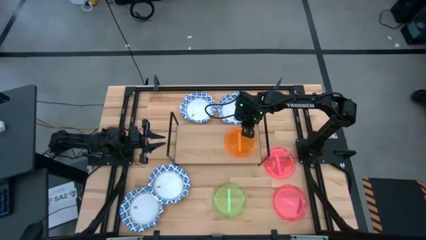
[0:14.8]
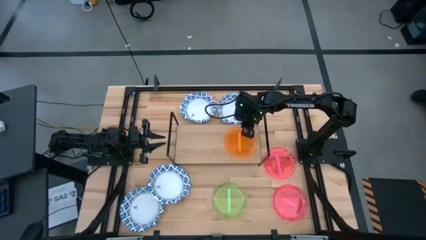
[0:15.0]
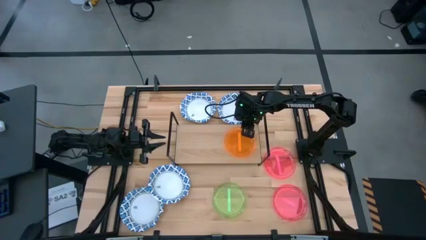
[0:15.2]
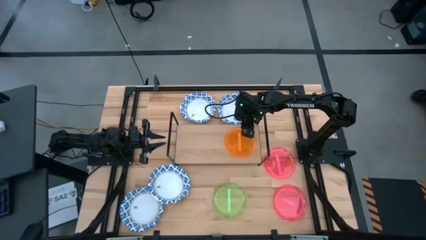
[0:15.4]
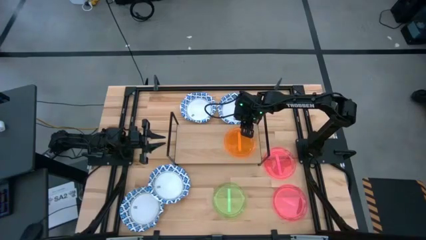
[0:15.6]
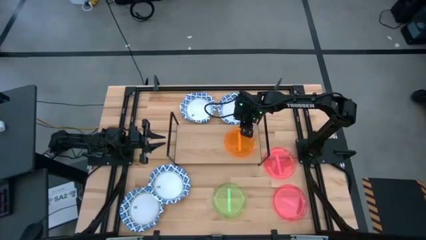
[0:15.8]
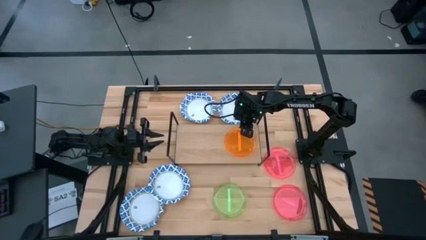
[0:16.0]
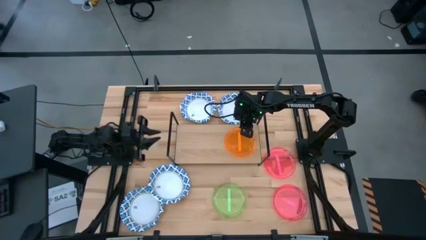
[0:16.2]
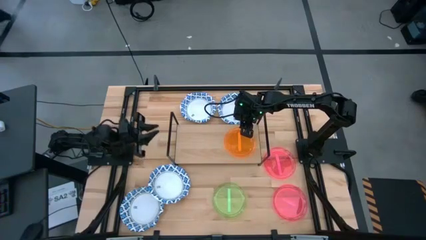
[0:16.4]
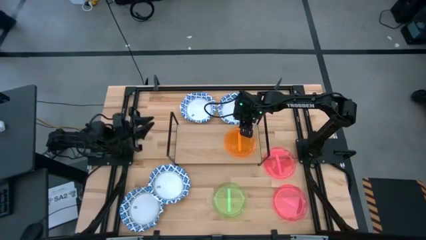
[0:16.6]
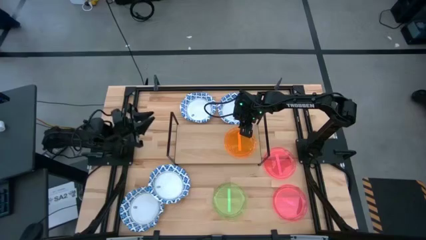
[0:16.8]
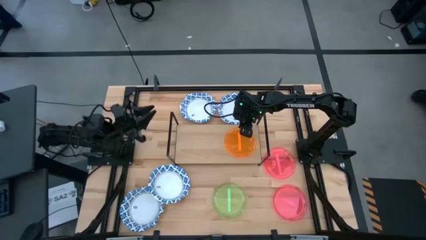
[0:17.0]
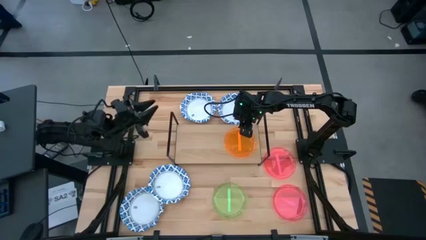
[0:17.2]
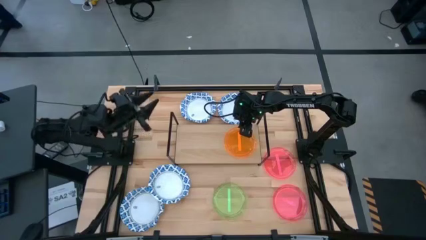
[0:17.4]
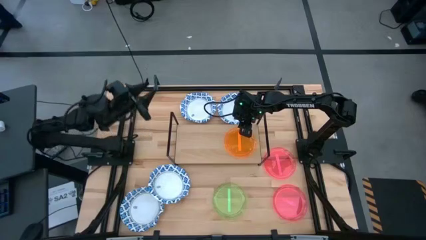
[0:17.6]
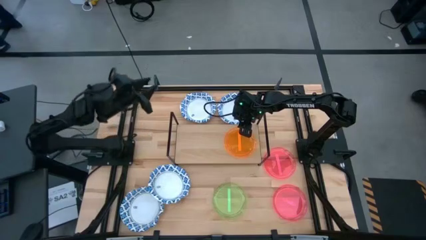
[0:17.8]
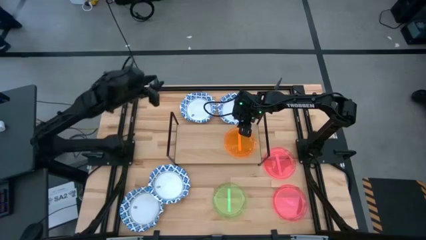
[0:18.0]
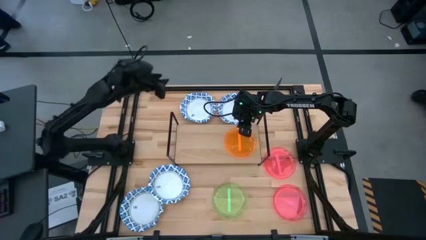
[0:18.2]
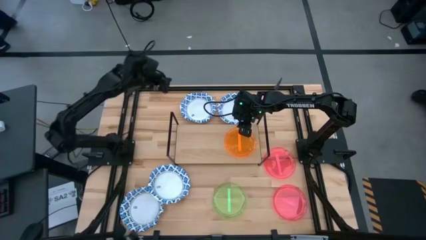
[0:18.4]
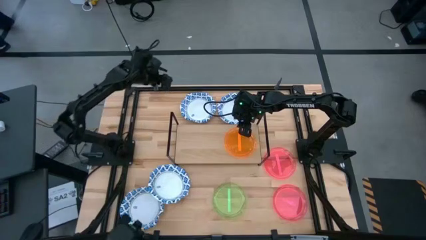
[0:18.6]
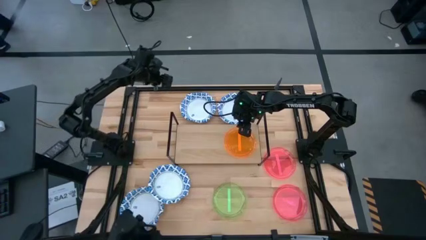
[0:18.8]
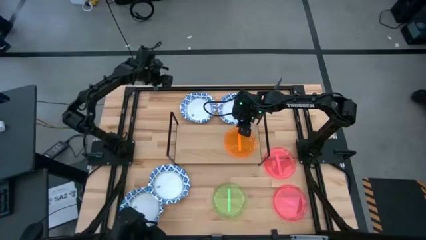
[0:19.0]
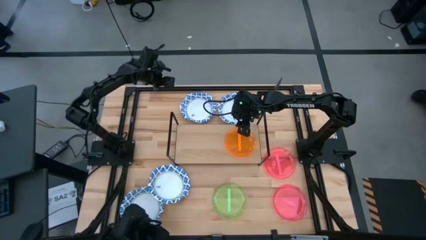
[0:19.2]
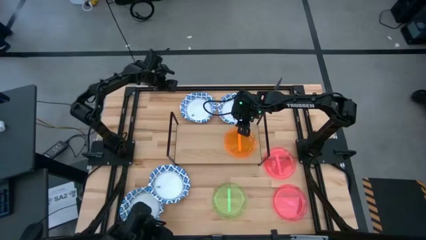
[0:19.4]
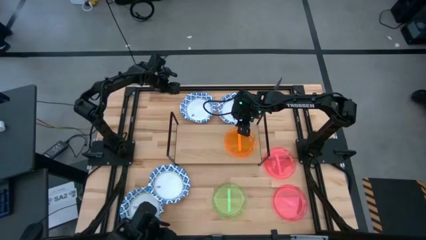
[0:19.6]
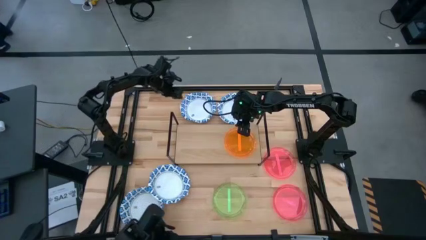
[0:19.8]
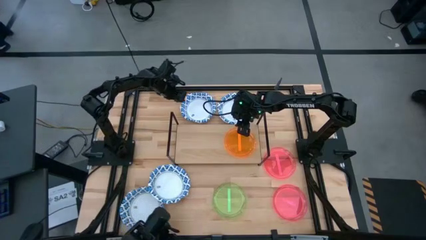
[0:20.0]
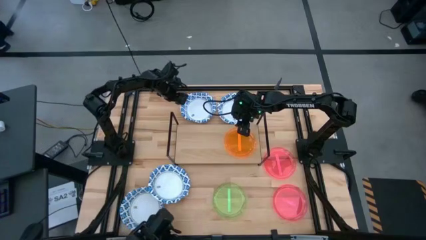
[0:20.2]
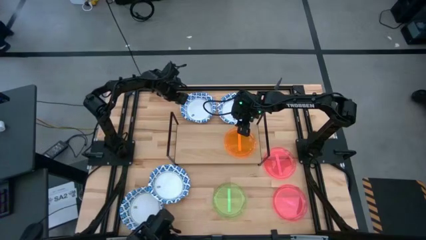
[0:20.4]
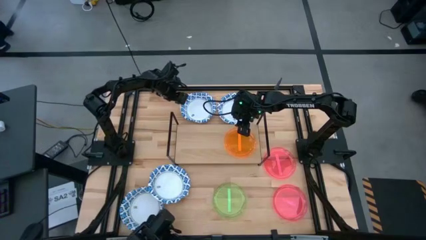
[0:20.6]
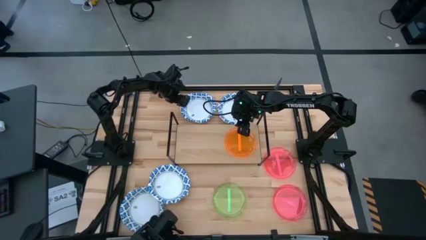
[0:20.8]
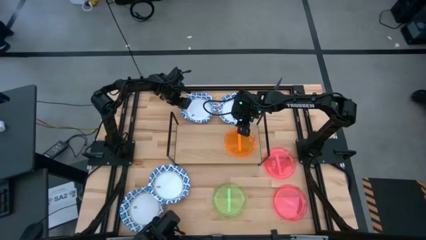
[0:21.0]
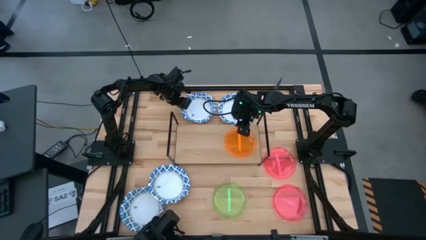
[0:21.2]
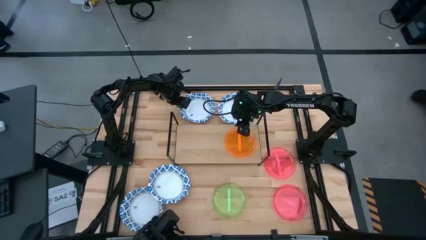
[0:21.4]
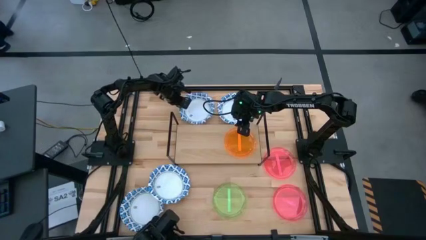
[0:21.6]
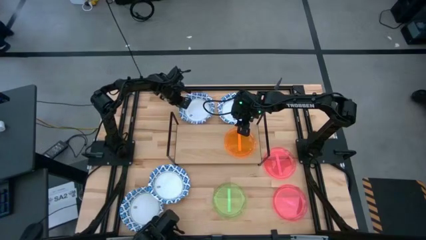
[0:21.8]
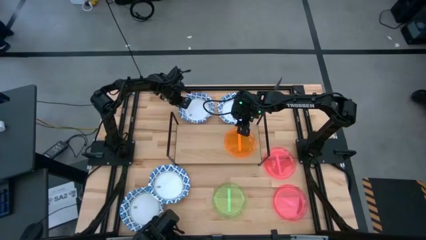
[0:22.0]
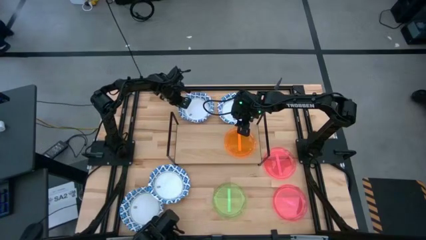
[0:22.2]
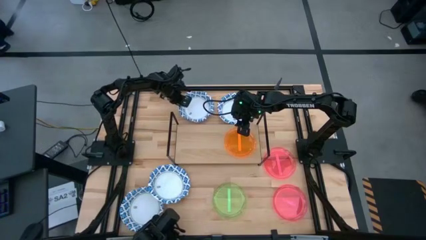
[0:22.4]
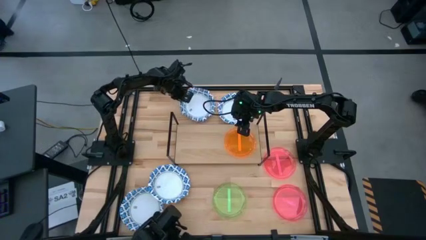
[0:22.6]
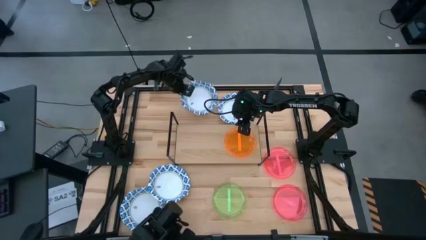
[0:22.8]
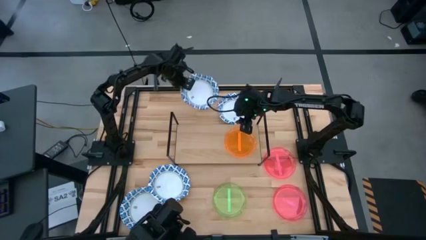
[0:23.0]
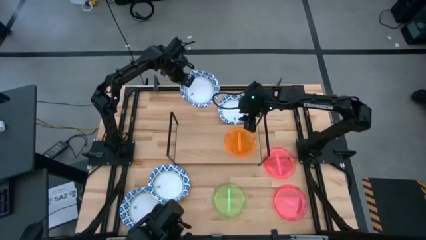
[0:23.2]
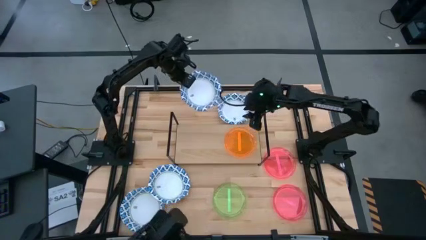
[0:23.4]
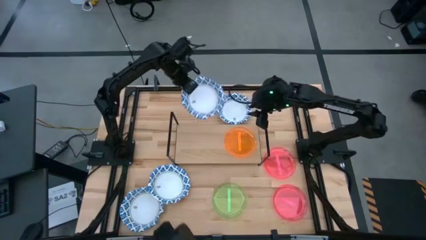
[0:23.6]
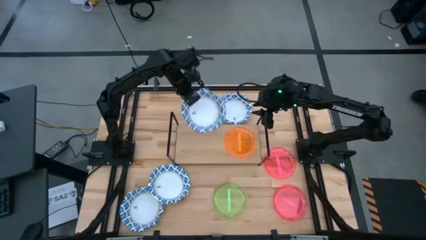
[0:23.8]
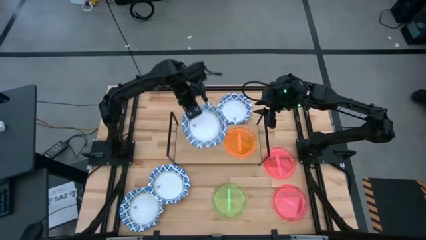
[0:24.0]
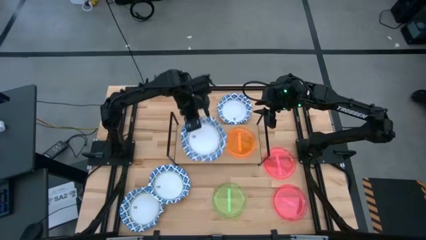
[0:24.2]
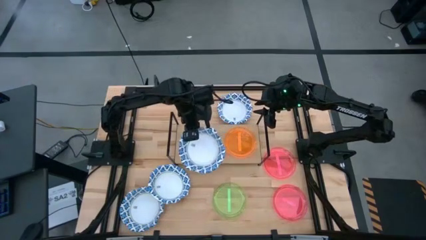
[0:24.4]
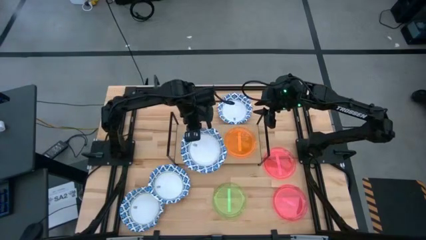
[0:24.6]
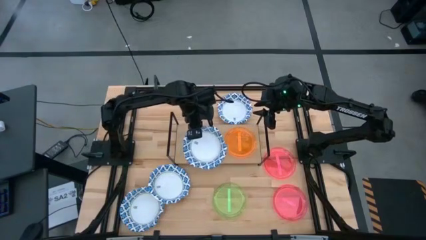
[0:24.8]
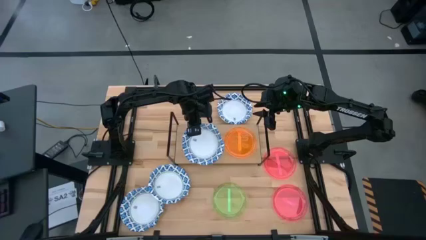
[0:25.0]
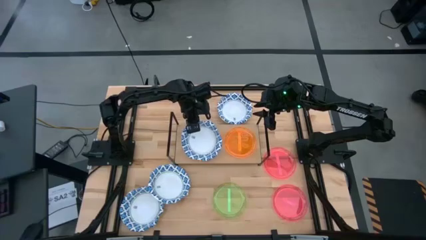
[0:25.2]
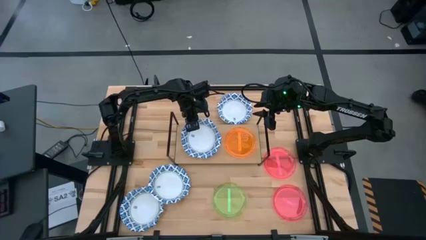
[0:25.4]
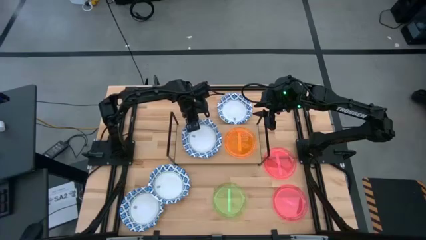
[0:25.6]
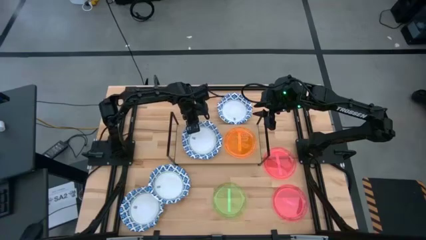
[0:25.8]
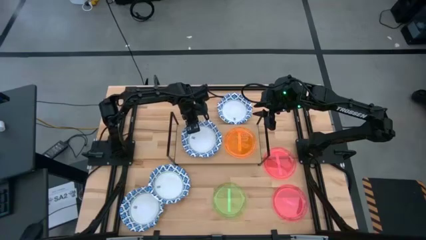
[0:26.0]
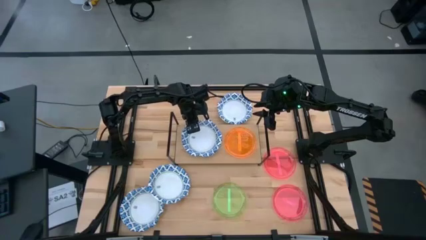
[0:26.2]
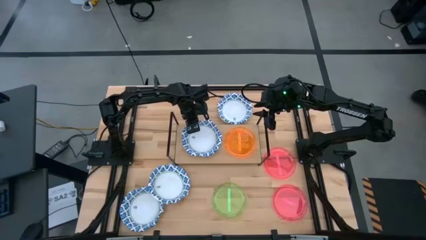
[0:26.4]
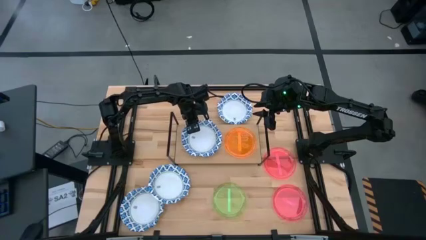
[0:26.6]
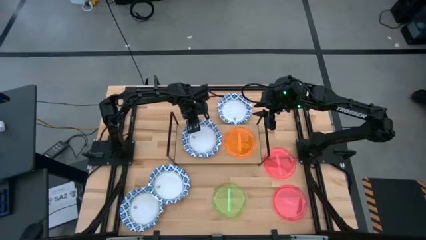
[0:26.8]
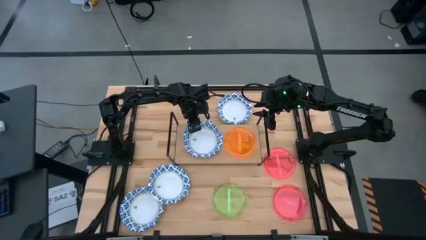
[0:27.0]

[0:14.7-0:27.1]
Task: Place and stack plates onto a shelf
Put the blue patterned bowl on the shelf

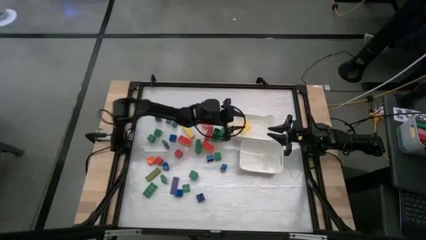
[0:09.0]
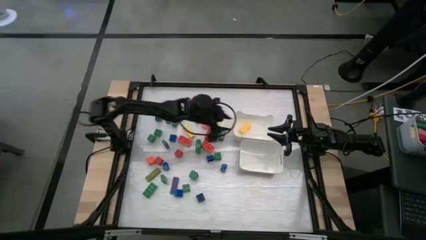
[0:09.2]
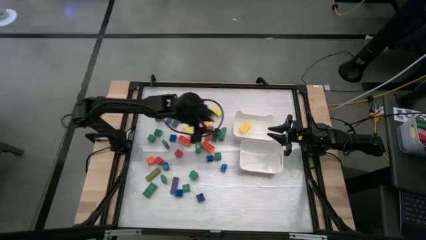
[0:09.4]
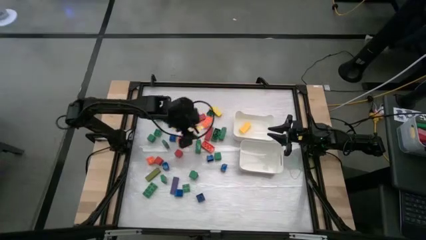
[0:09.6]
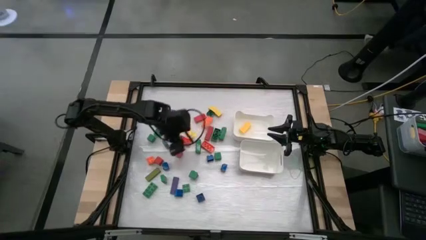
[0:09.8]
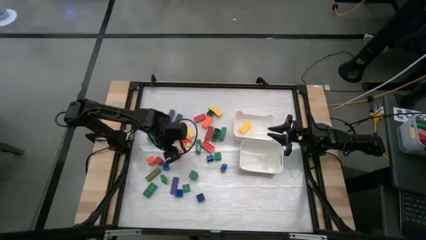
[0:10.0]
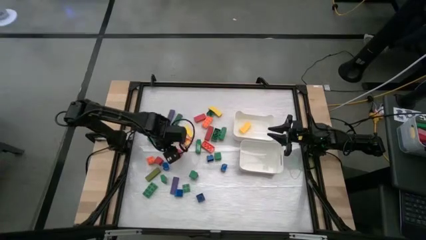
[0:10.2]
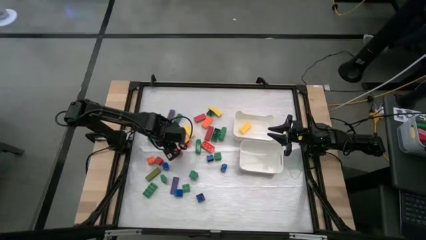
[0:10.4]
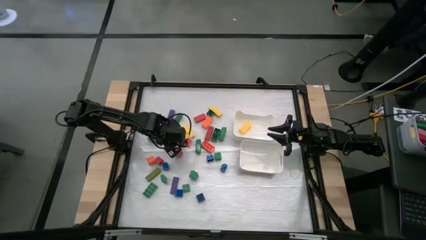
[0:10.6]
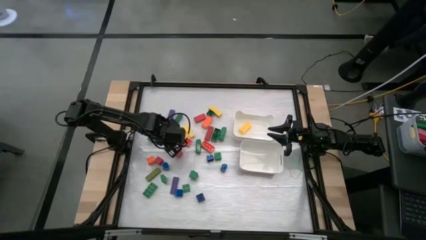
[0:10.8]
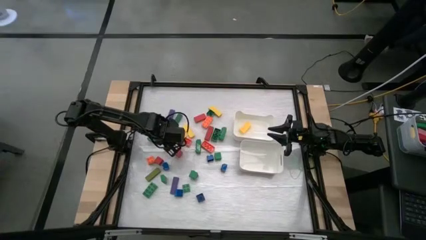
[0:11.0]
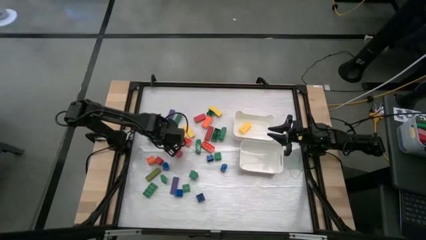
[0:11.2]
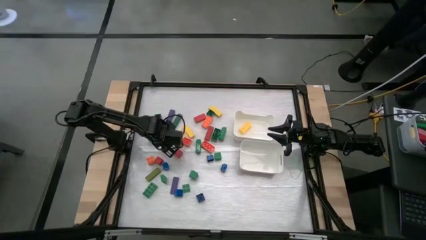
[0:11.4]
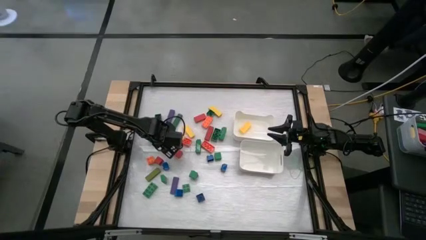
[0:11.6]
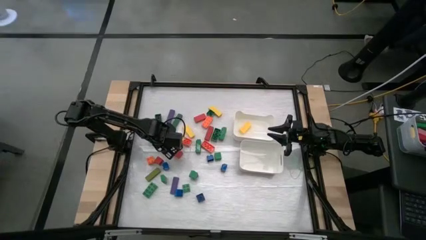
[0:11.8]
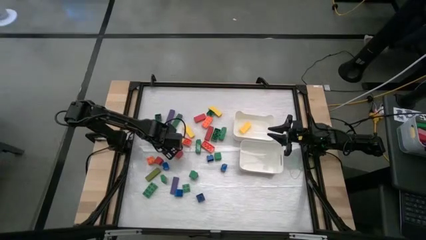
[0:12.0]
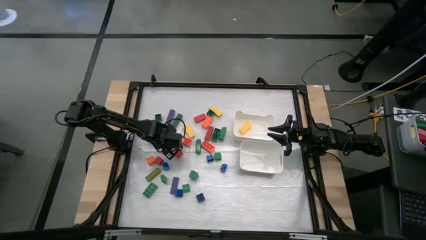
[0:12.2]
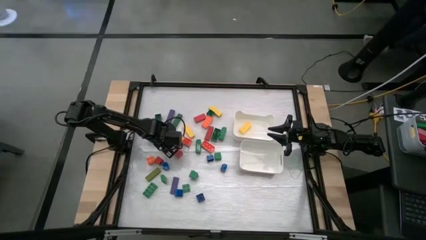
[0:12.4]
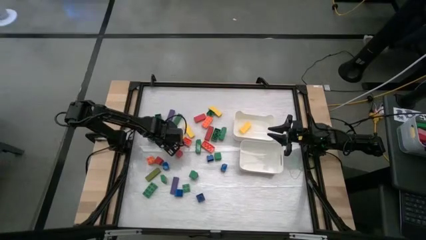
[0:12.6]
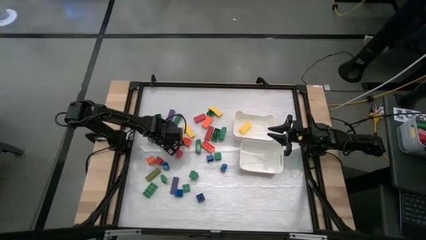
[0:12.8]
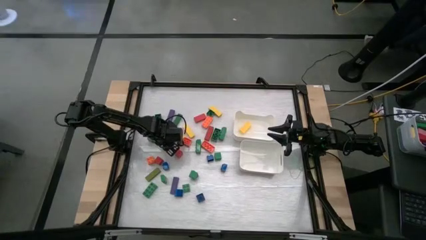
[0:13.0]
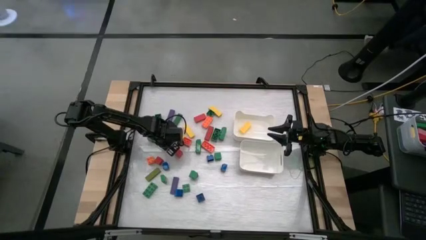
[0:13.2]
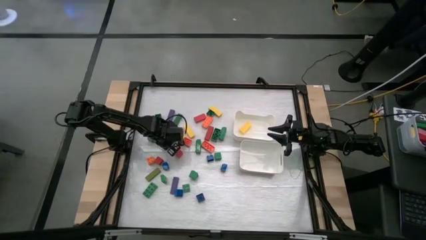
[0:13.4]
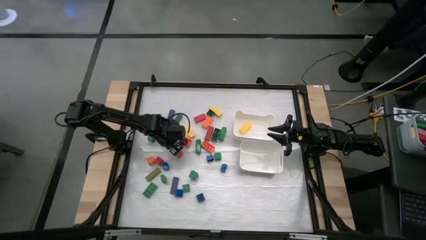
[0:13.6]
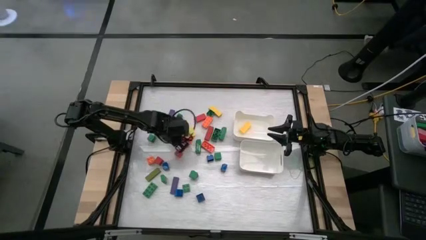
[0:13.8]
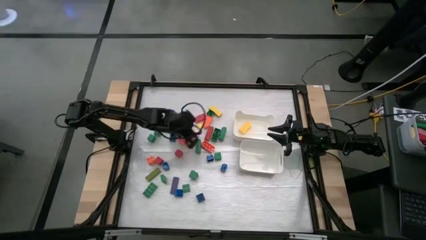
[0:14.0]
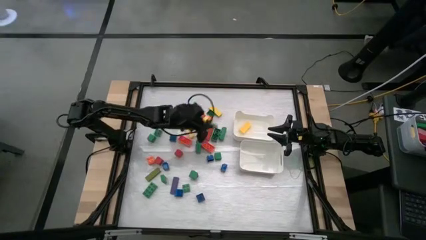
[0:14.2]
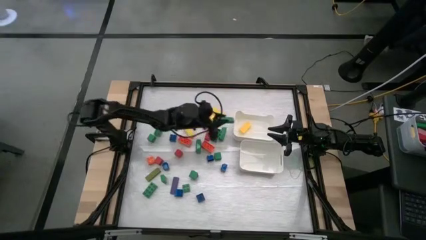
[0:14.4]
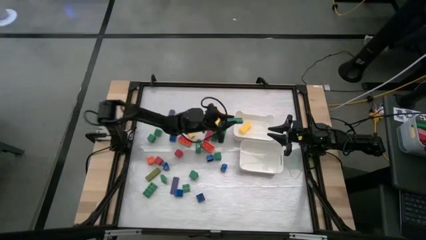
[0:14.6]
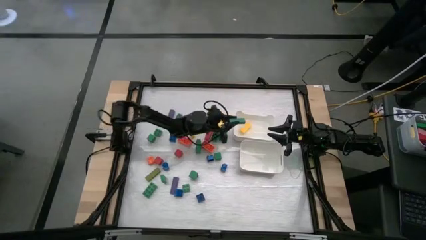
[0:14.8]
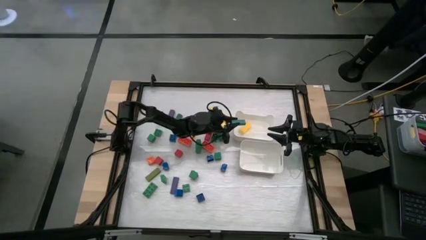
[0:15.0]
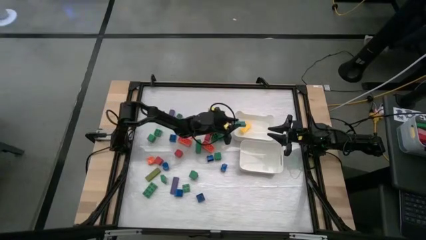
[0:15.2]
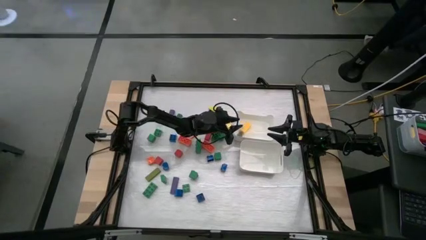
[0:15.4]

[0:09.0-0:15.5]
Task: Sort blocks by size
Put the green thin rectangle block into the top white bin
